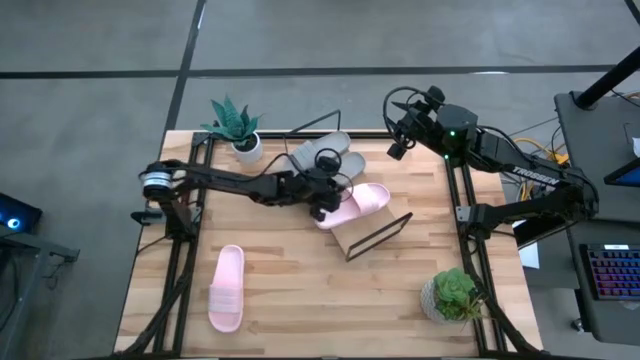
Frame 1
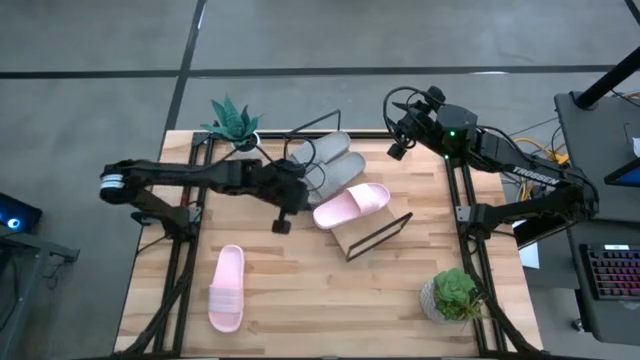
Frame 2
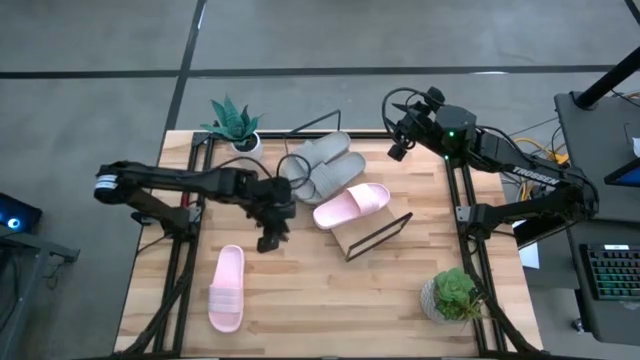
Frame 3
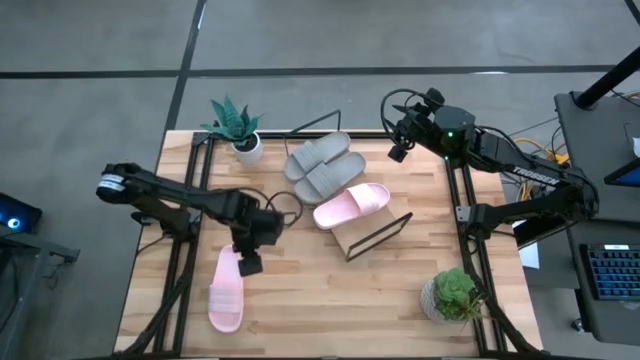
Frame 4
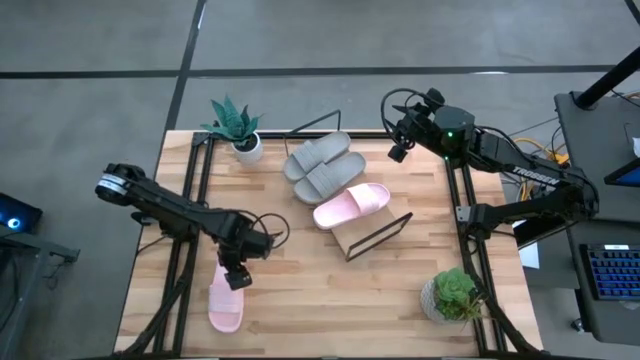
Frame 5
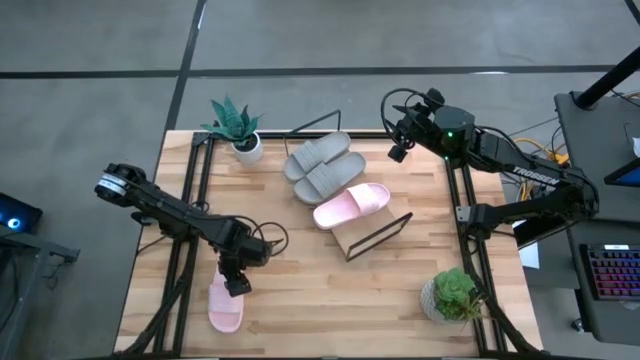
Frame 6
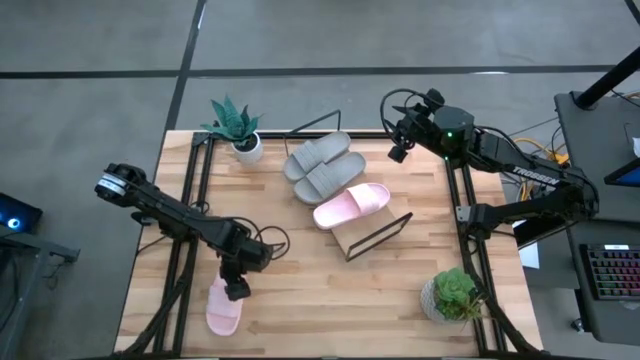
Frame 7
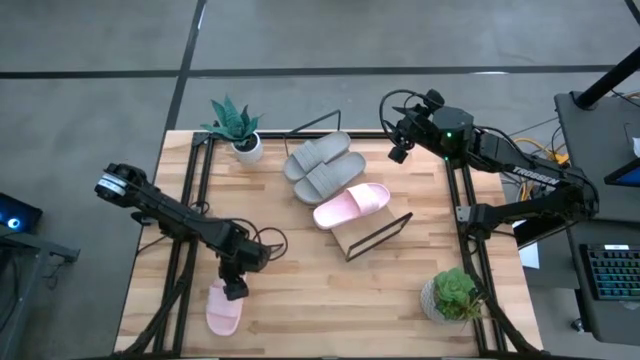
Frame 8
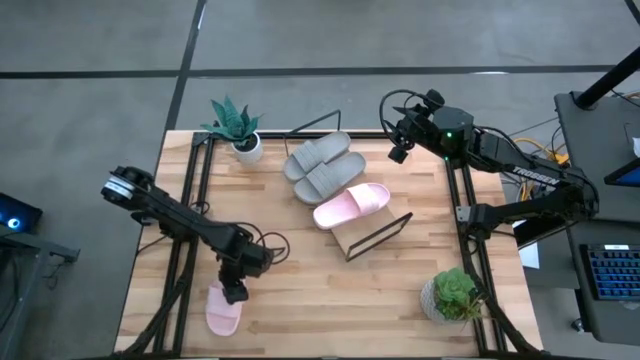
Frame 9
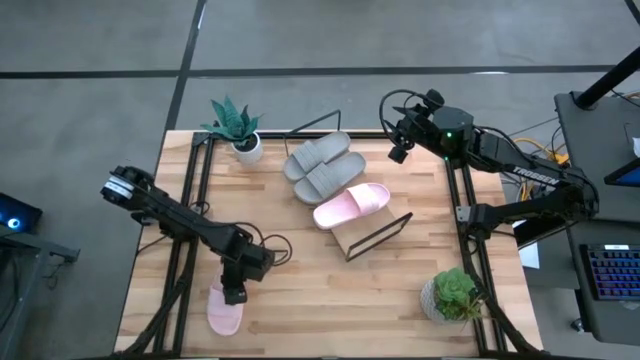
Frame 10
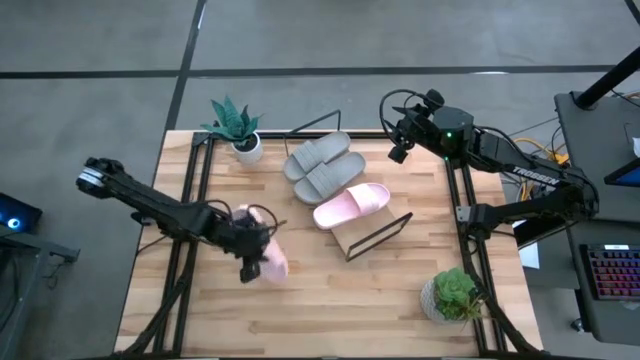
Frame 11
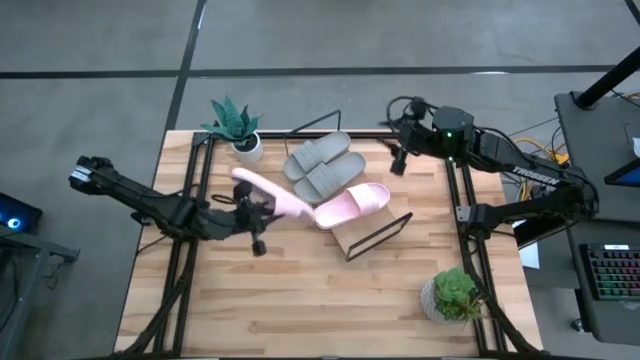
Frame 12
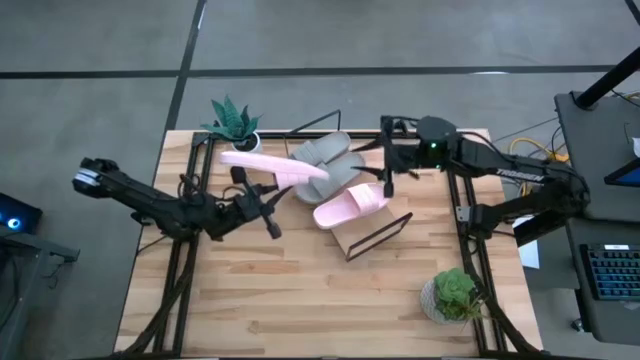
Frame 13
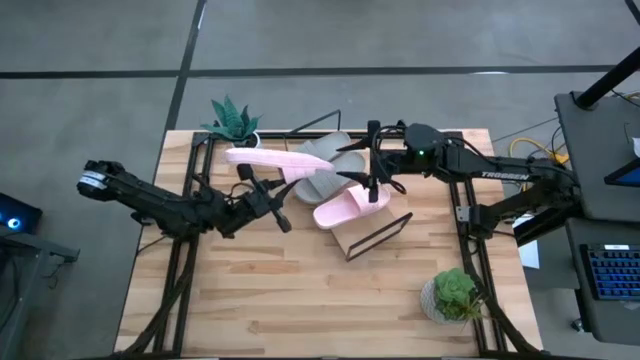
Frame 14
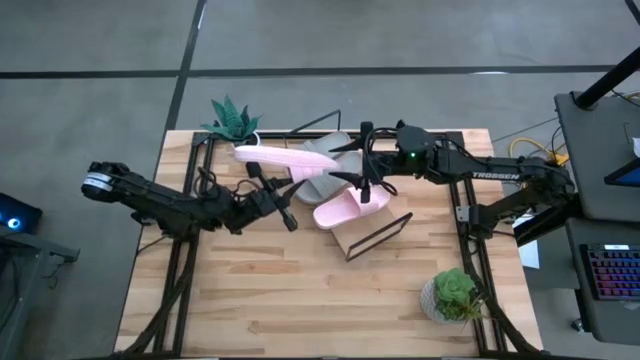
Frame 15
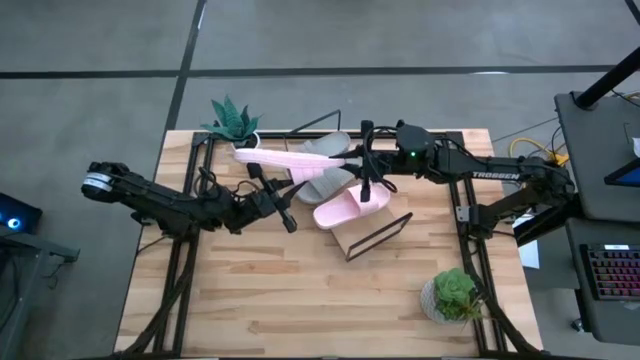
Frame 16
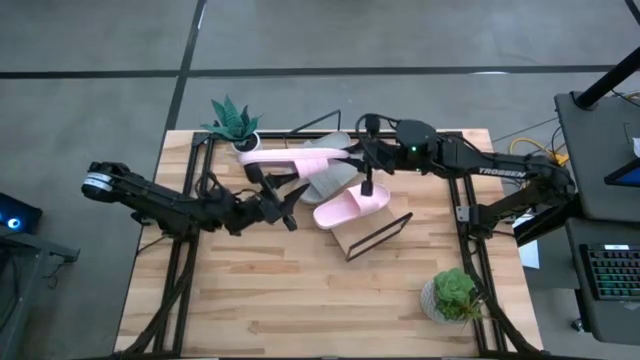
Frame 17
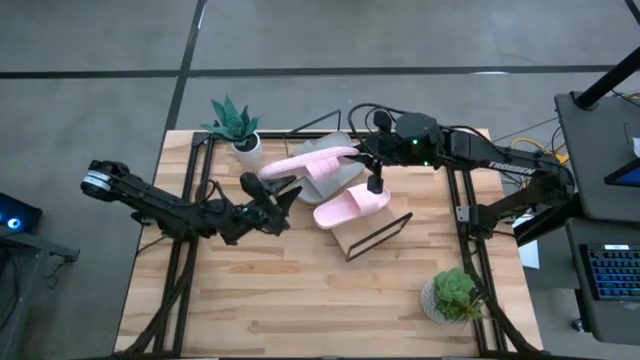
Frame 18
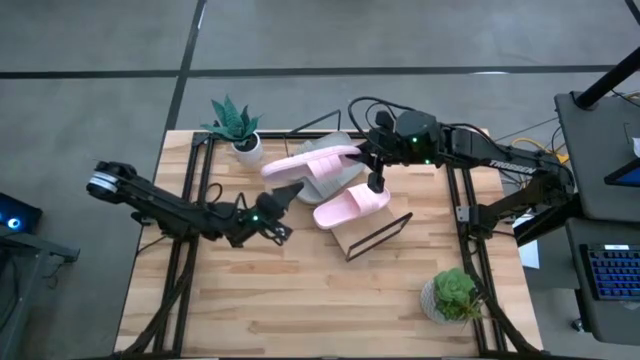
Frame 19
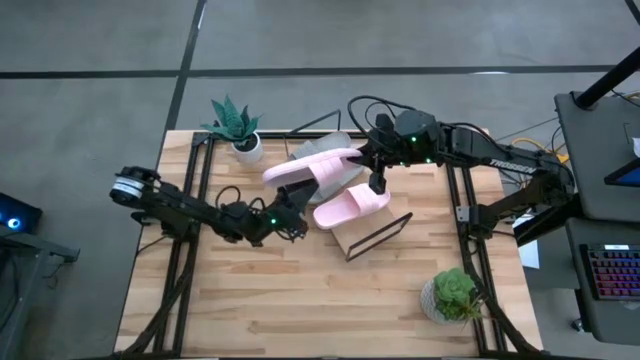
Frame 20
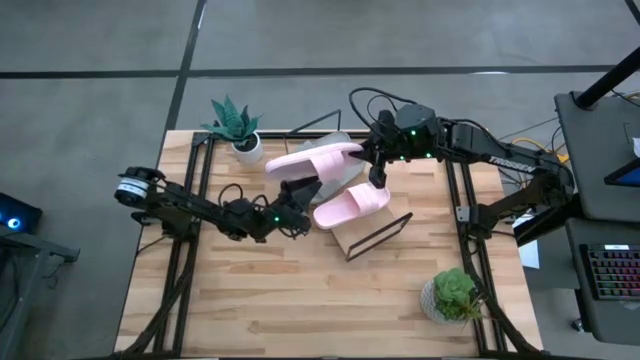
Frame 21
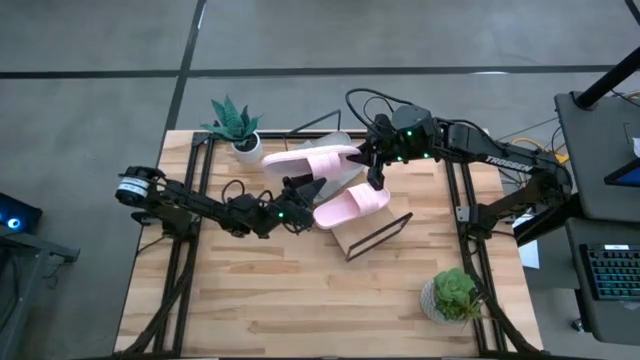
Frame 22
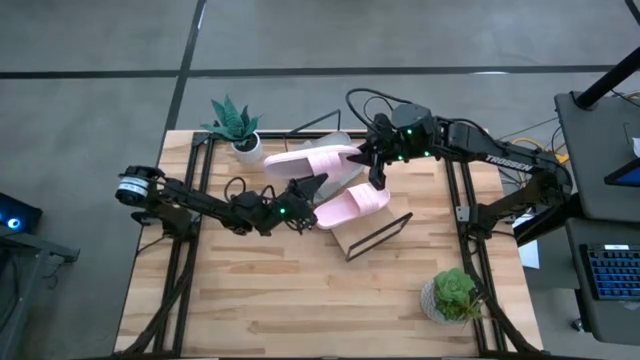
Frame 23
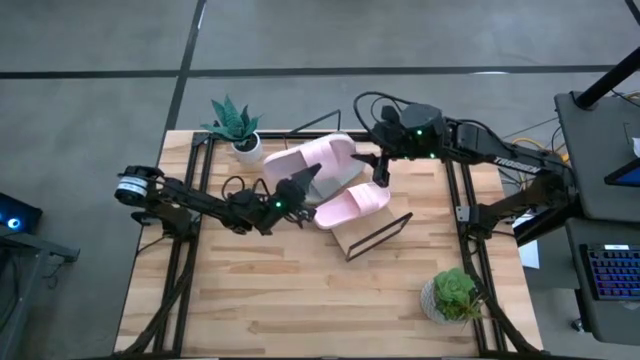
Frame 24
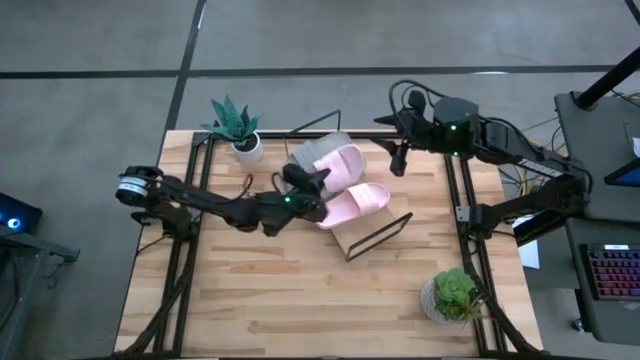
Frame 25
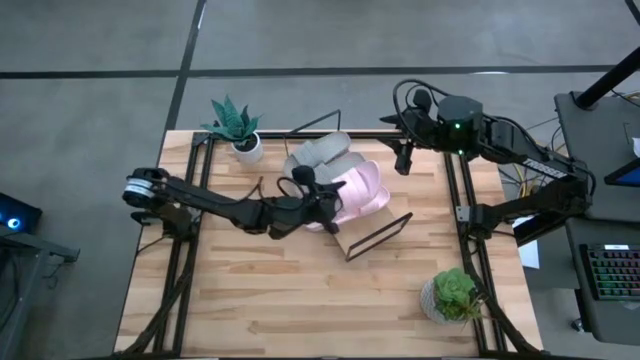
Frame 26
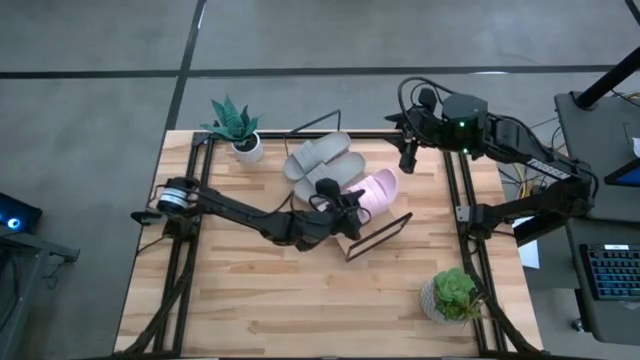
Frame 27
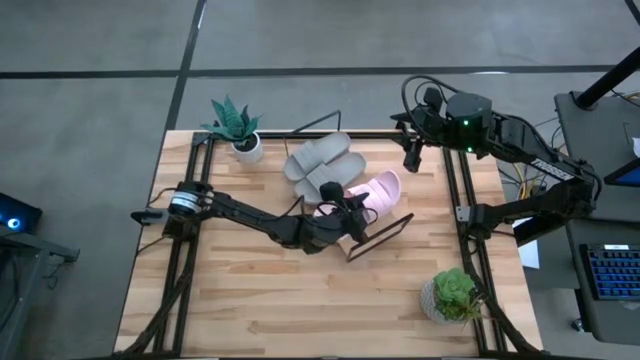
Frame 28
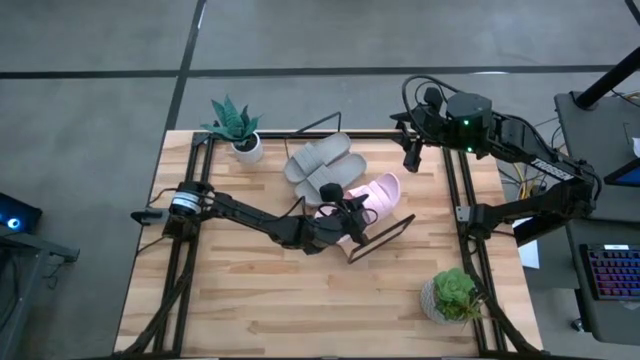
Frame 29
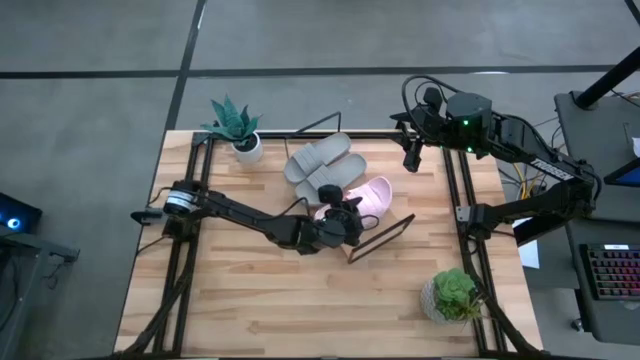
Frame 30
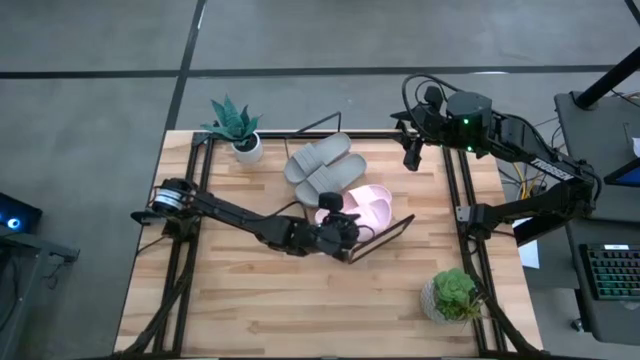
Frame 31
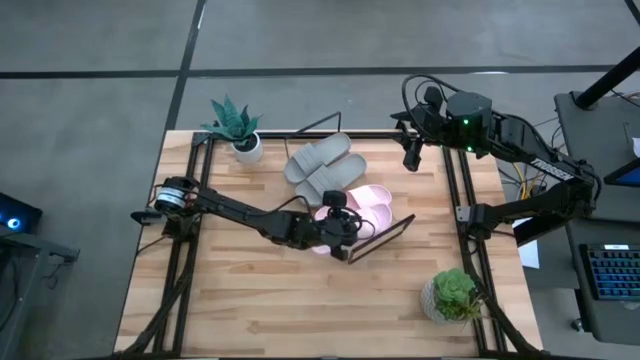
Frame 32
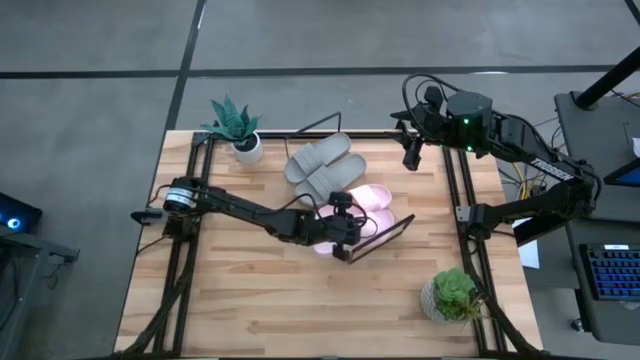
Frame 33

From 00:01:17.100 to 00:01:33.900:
Task: Pick and place slides into the shelf
Put the pink slide on the shelf

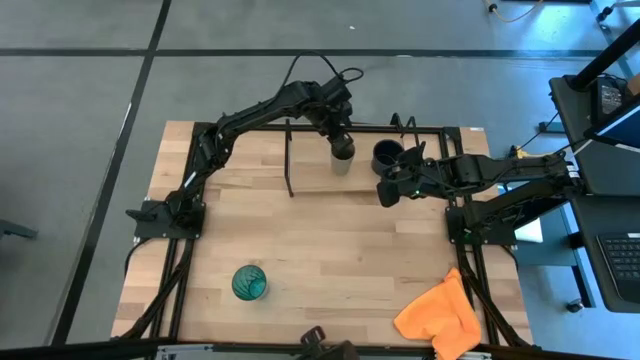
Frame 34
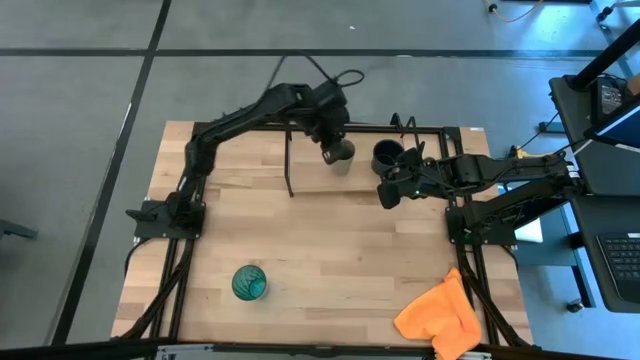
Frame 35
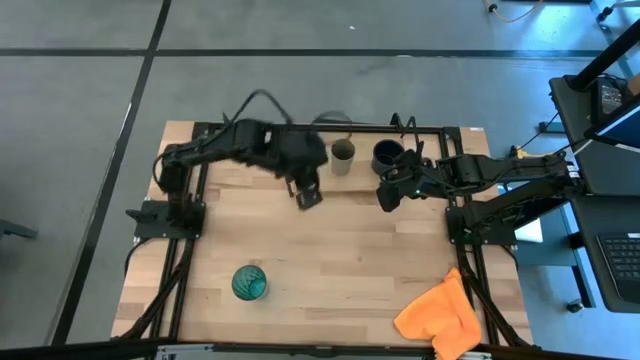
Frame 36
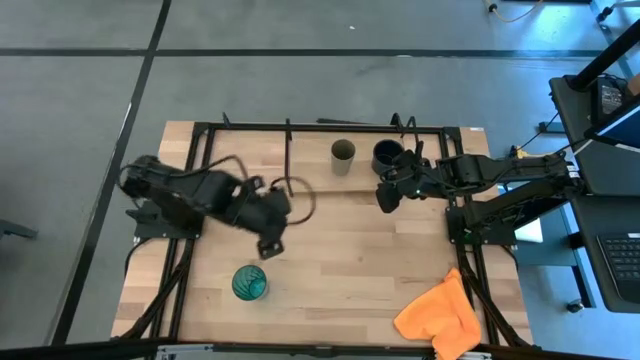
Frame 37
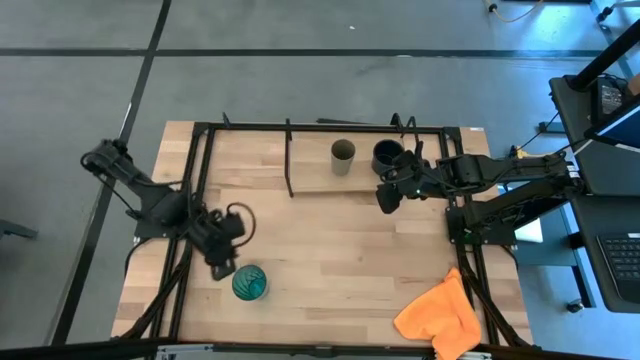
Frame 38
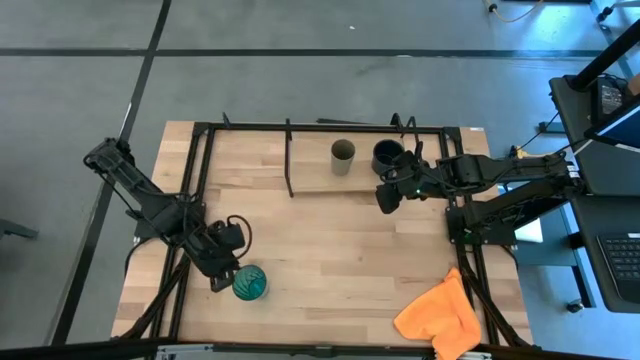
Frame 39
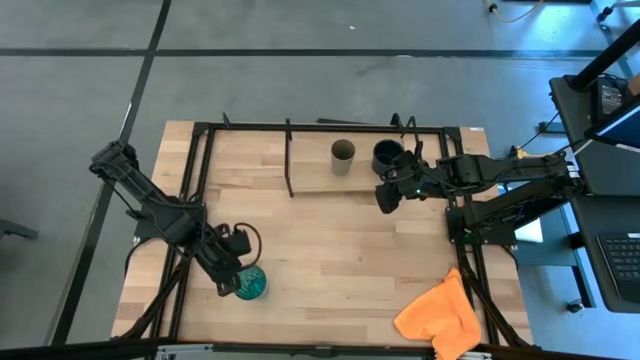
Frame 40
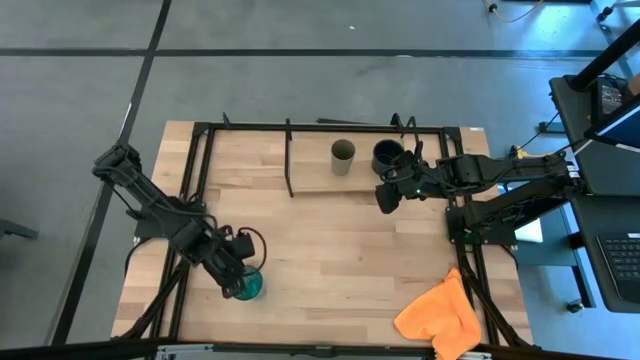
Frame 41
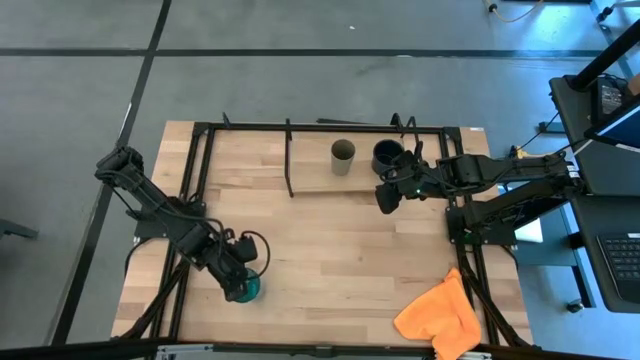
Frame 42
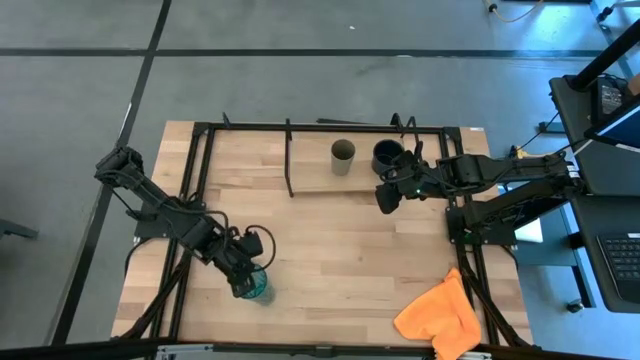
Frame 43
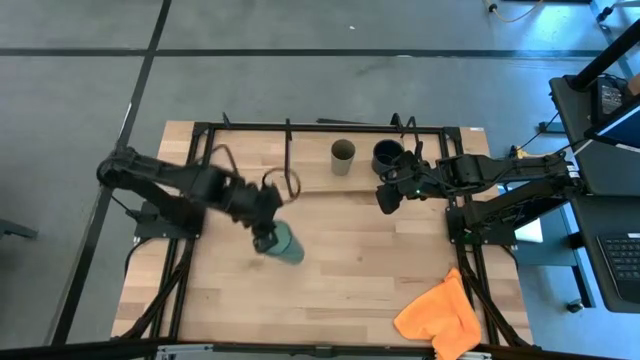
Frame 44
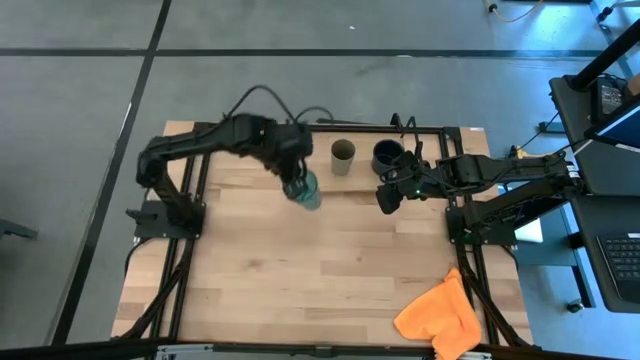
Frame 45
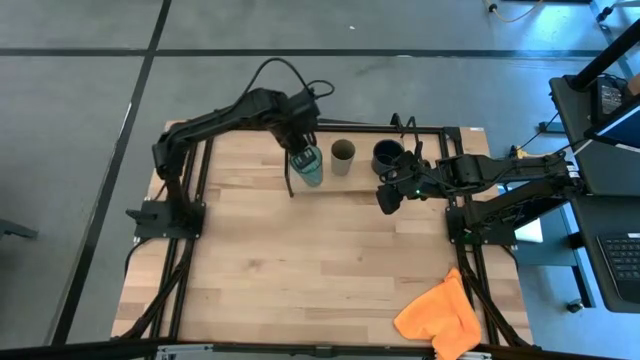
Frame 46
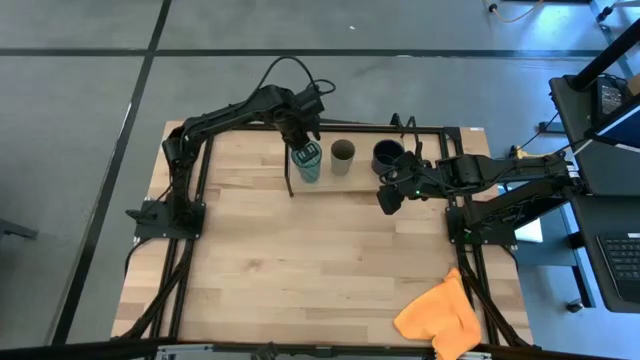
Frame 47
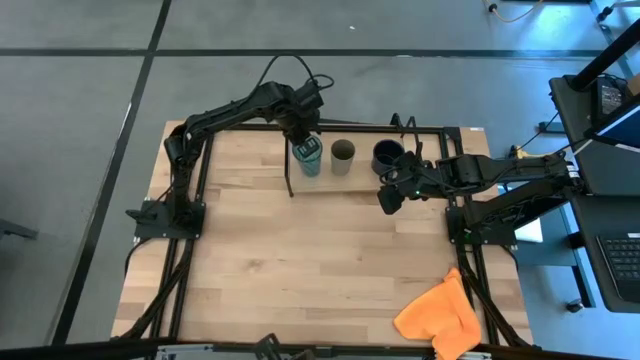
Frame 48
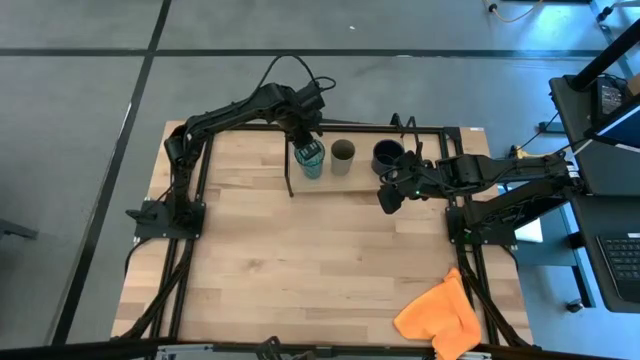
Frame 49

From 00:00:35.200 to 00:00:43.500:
Task: Stack small to large cups/mugs on shelf
Put the blue glass on the shelf
